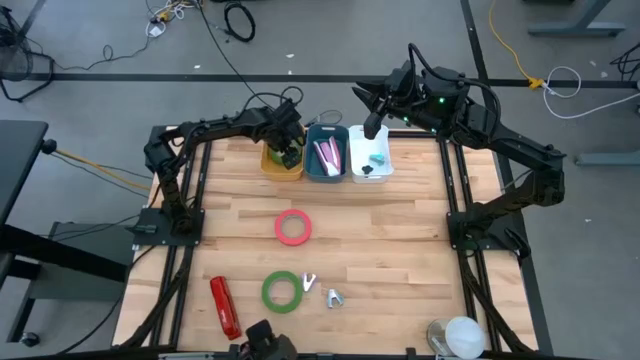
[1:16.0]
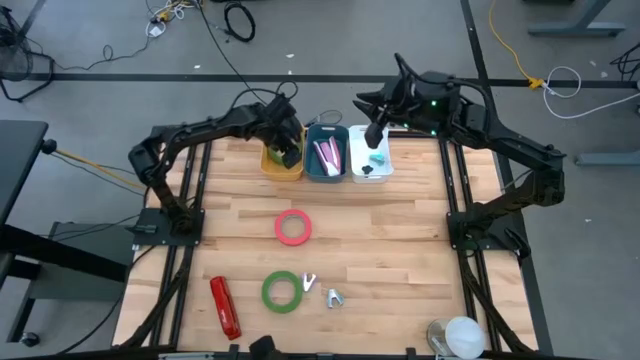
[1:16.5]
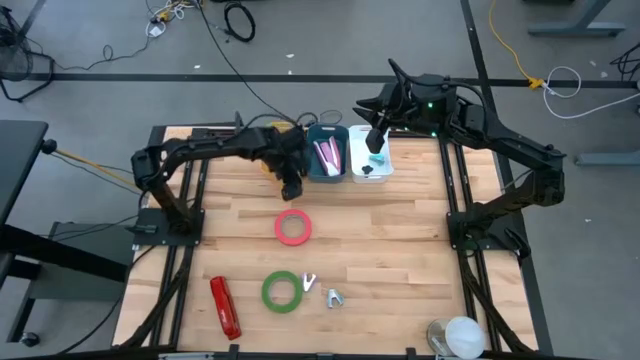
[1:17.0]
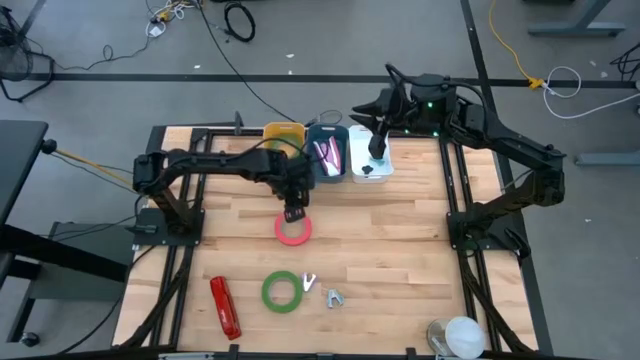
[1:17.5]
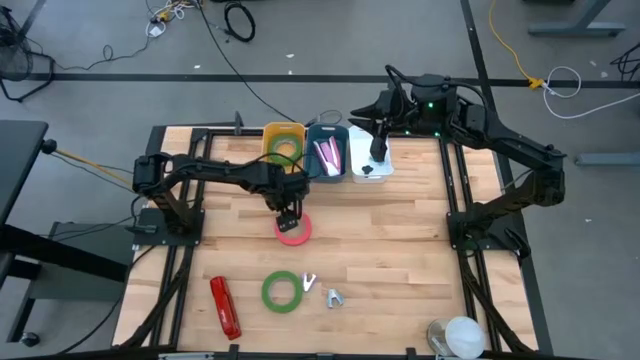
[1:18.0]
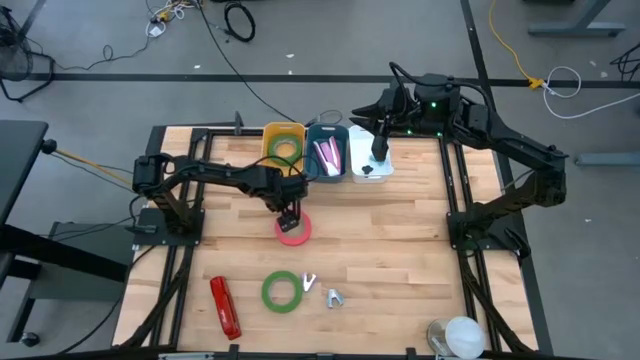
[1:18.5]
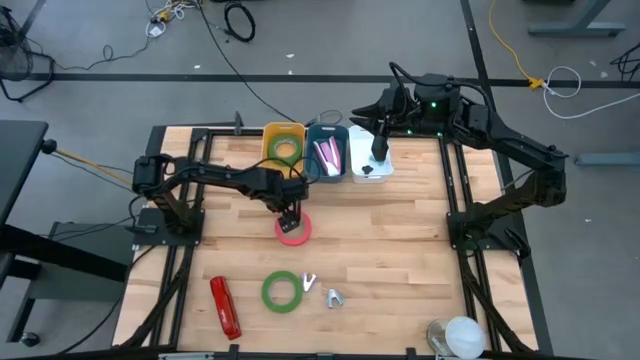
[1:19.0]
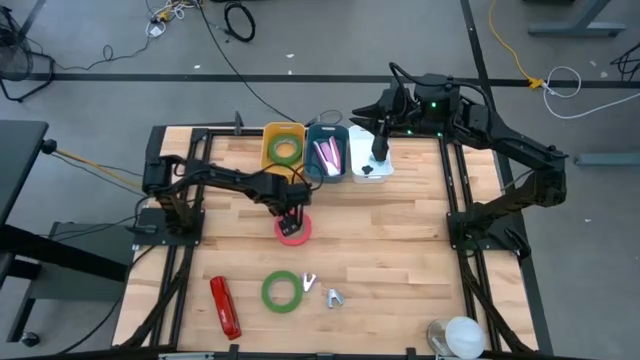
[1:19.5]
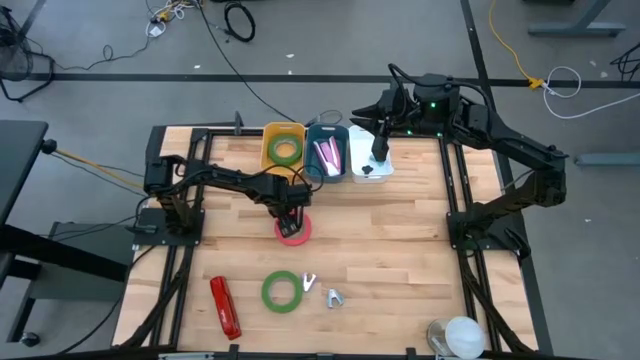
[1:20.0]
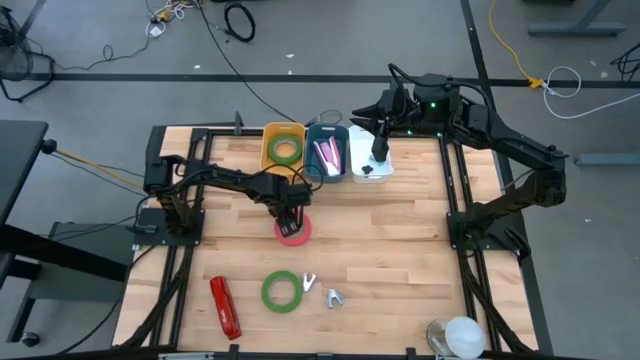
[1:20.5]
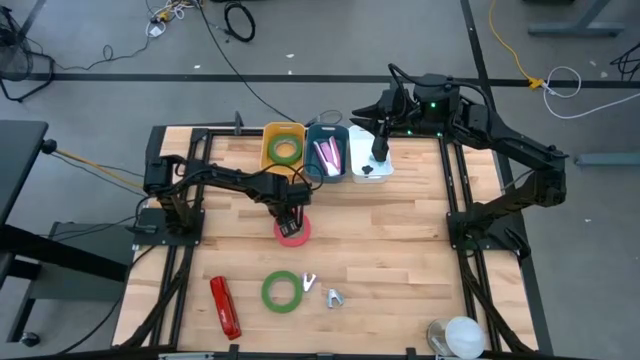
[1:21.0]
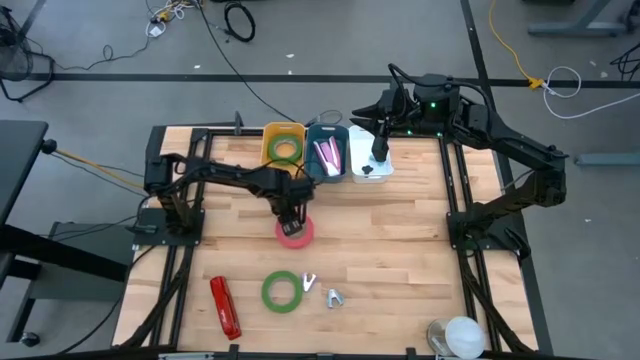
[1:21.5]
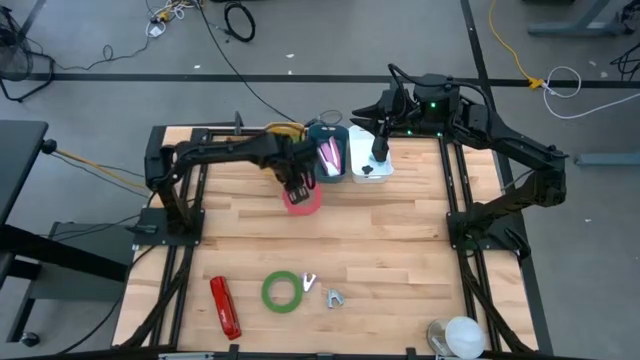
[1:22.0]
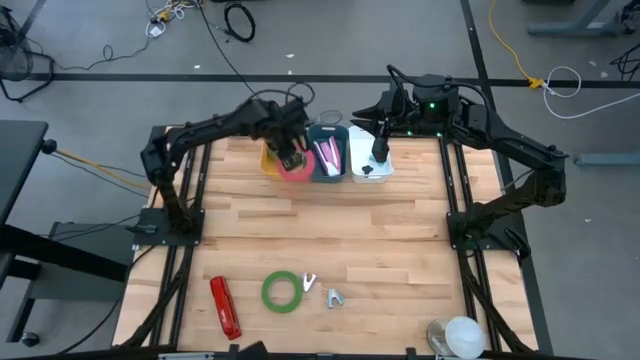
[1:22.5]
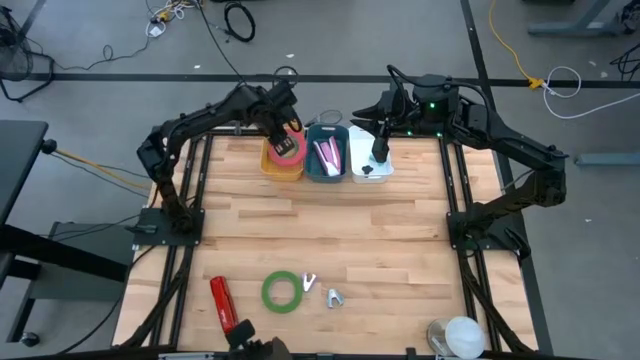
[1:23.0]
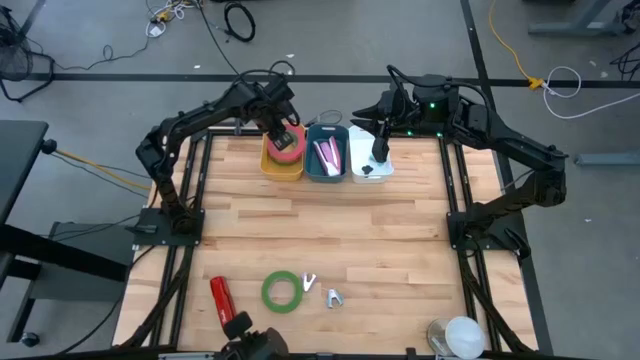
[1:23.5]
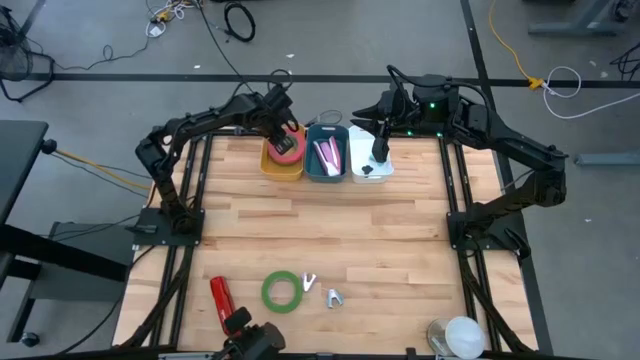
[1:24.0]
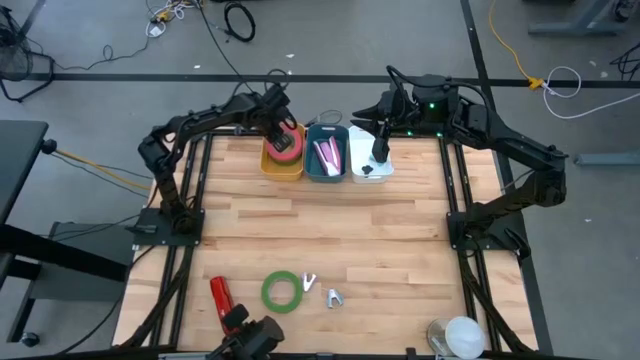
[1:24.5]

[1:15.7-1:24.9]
Task: Pick and place Stapler, Stapler remover, tape
Put the pink tape into the yellow bin

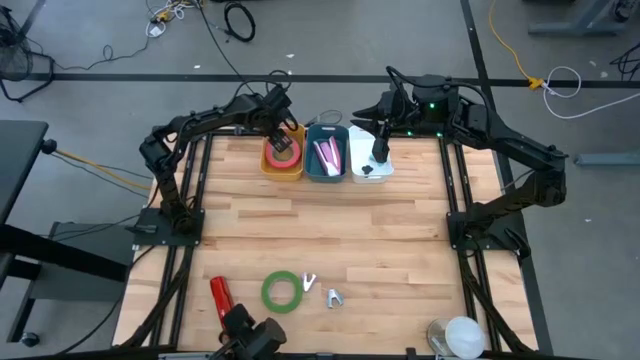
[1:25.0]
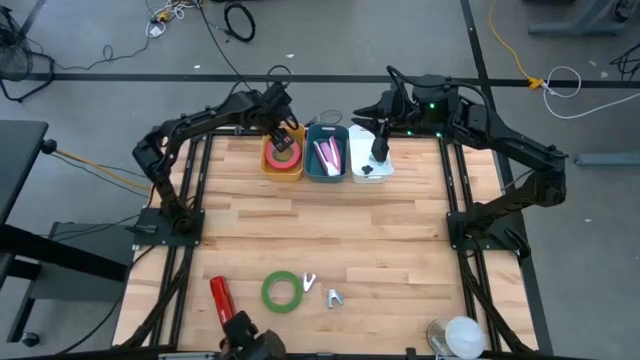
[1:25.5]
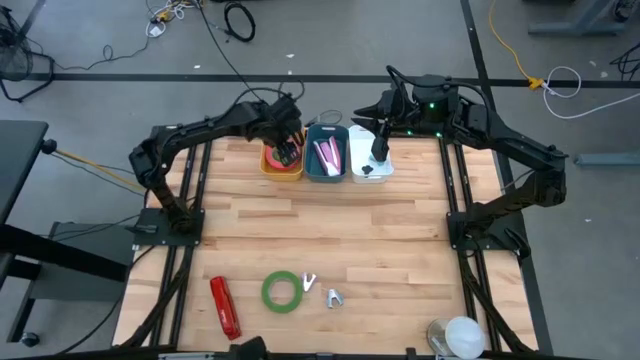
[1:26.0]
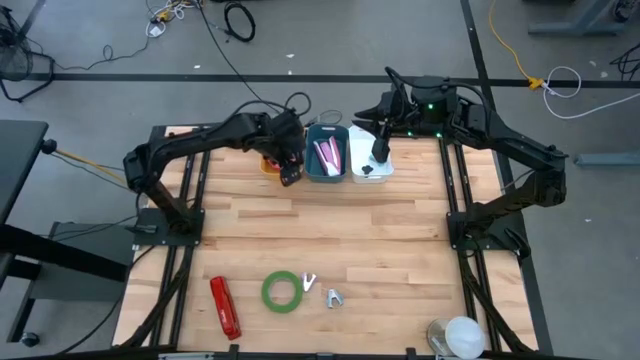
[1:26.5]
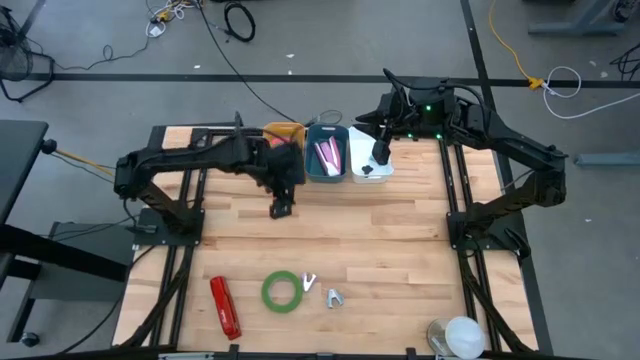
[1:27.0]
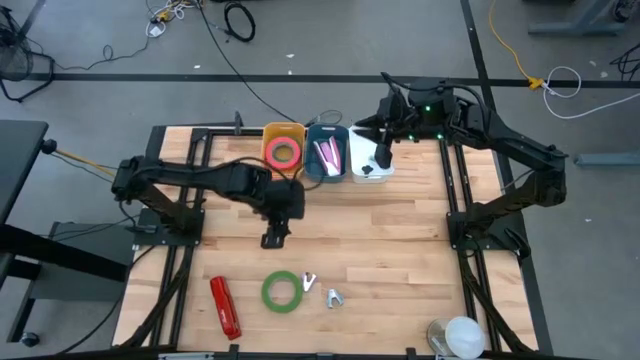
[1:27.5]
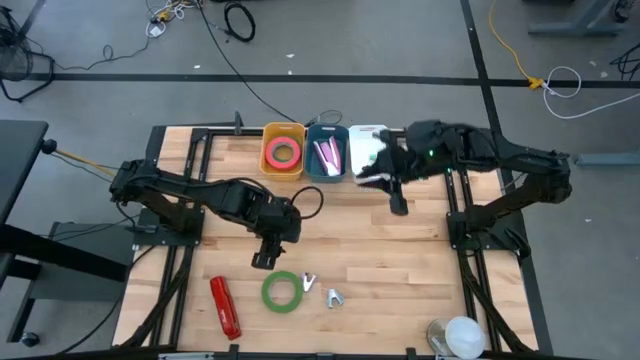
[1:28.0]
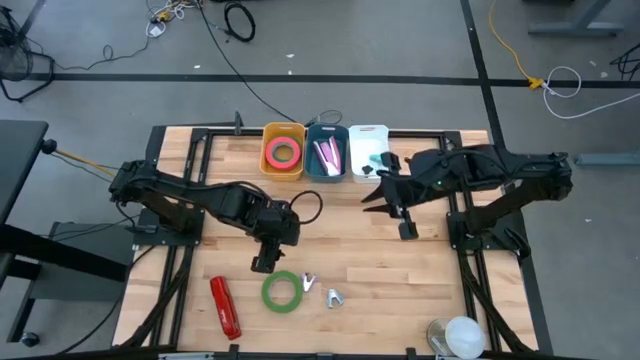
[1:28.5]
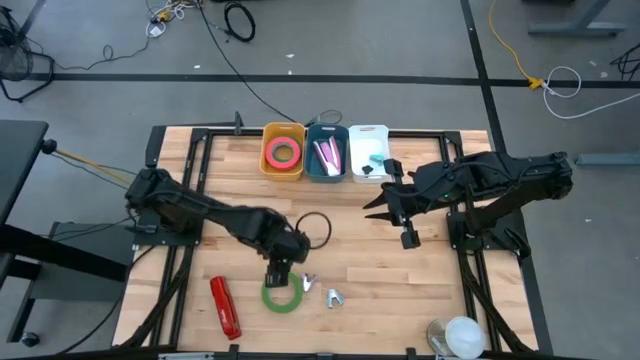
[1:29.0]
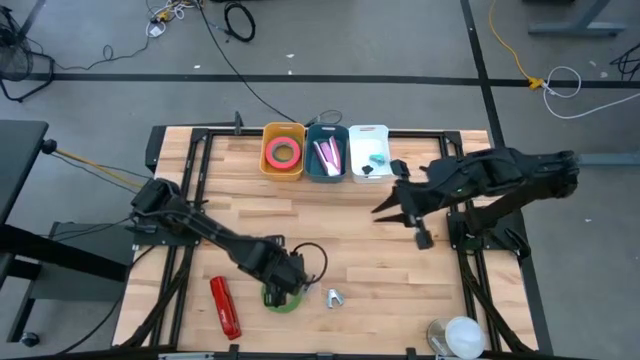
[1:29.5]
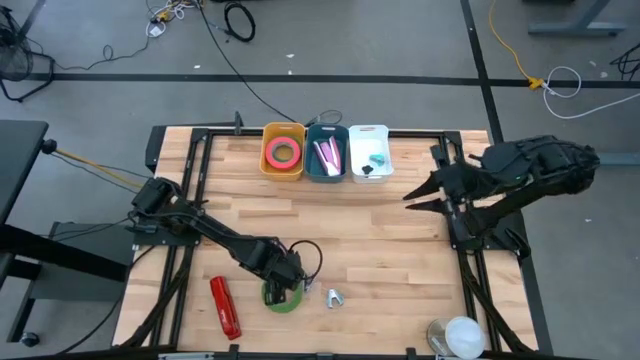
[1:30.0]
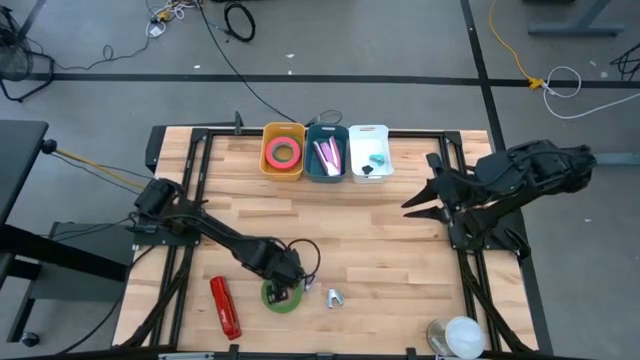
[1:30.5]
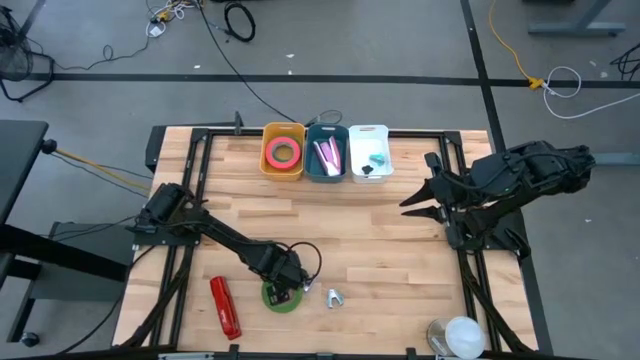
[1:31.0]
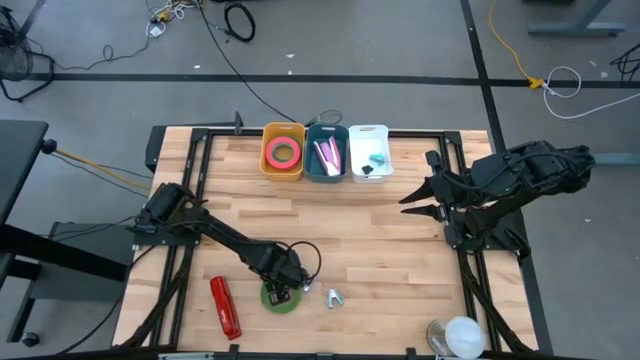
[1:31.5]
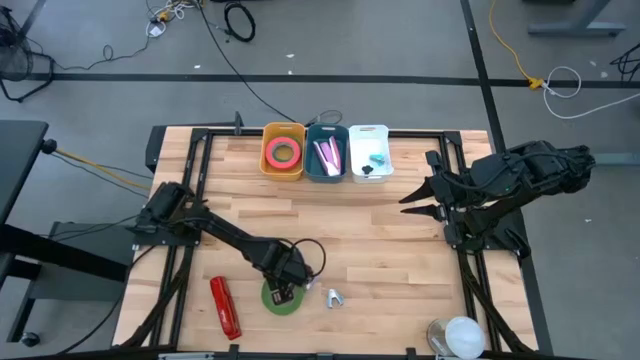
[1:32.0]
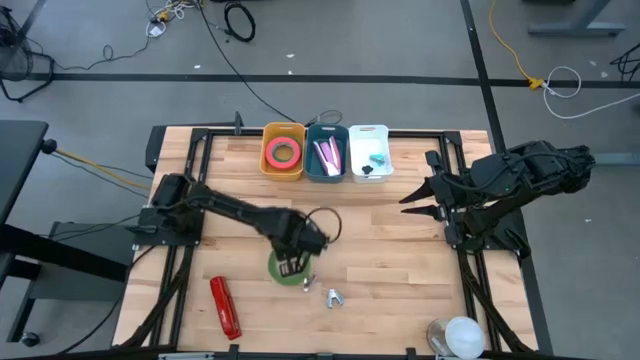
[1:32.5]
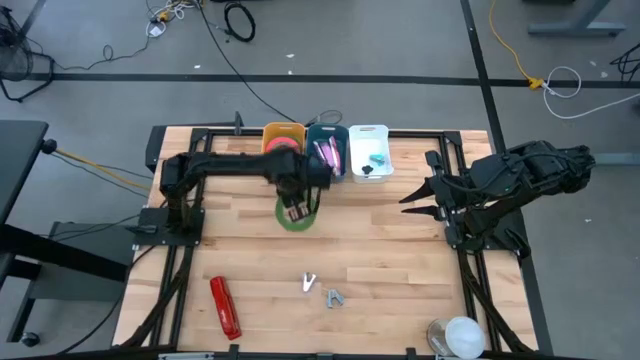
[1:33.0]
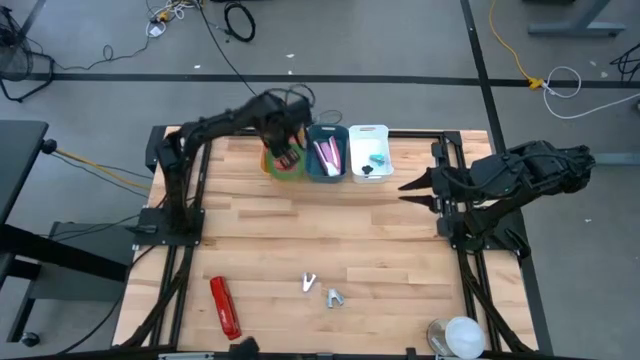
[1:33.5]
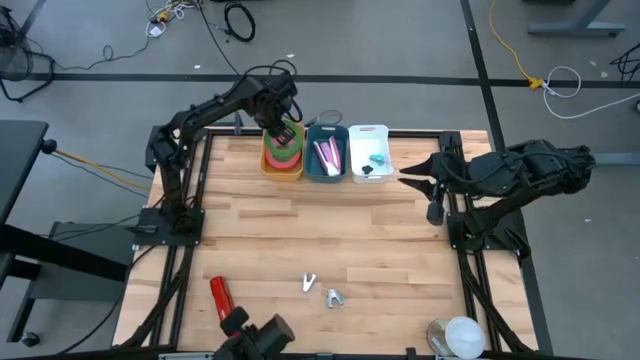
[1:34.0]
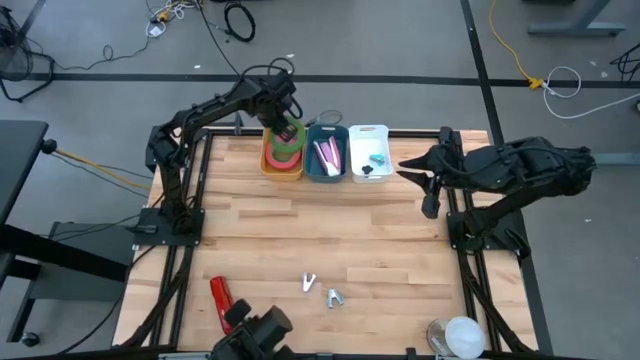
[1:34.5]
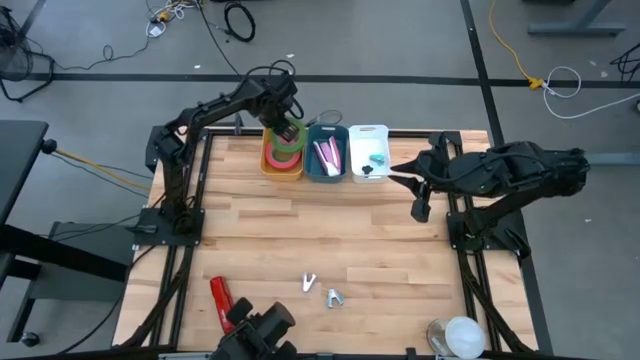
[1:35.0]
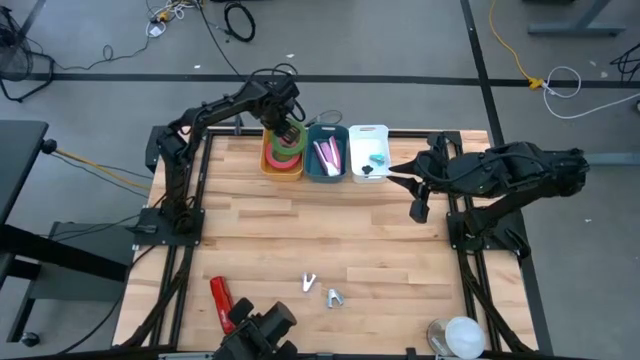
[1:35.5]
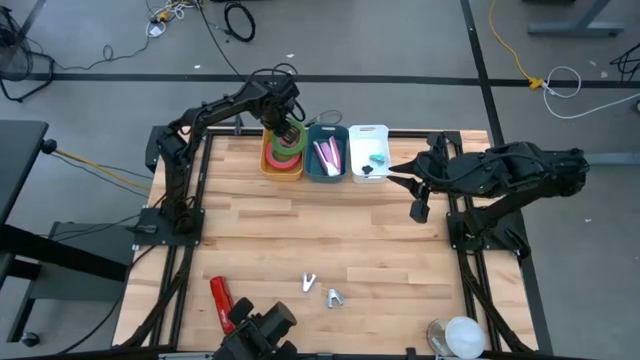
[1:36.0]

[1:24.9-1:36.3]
Put the green tape into the yellow bin

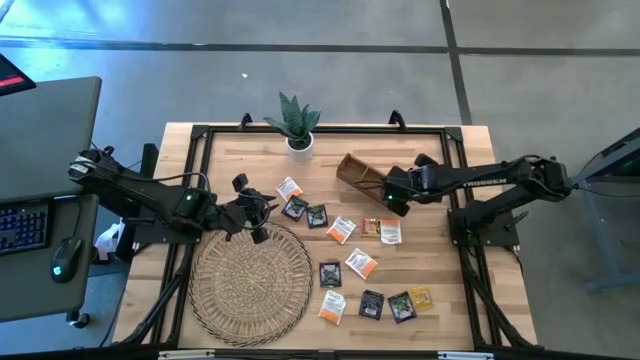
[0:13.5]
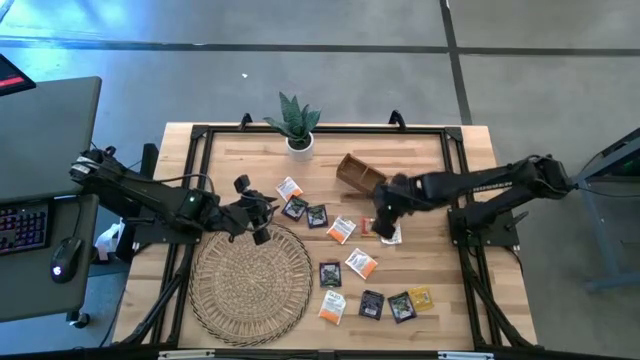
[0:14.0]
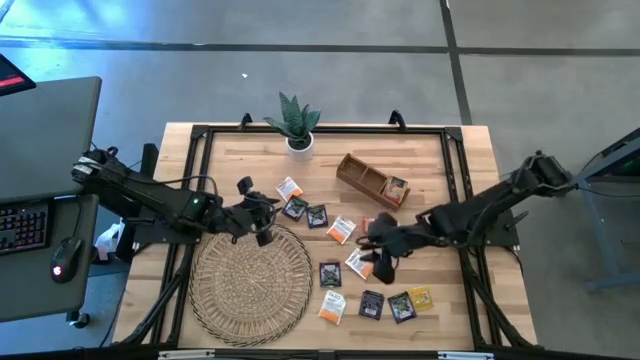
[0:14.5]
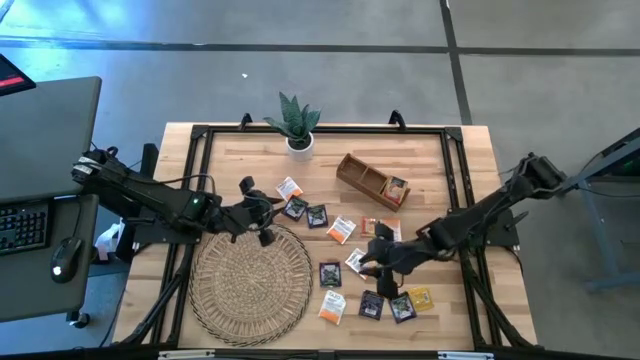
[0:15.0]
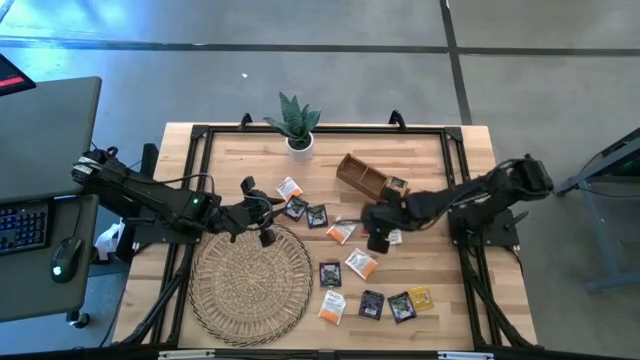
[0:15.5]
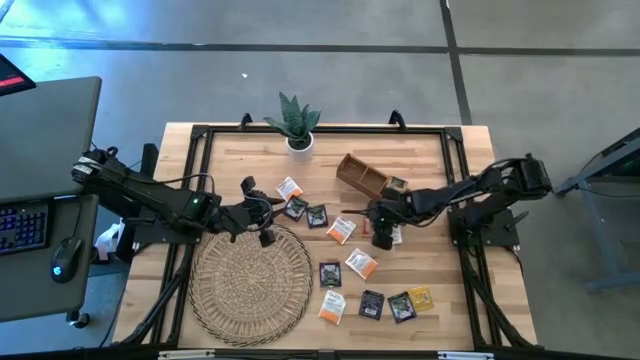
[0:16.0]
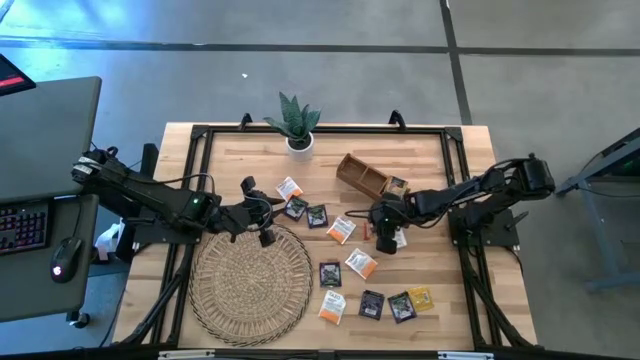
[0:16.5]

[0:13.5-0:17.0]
Task: Pick & Place Tea
Put the orange tea bag into the right section of the wooden organizer
